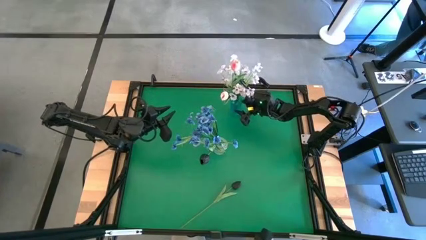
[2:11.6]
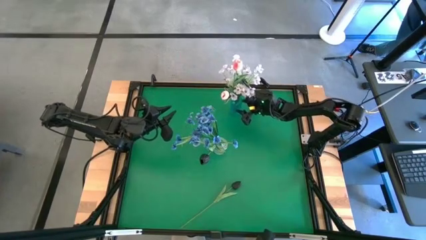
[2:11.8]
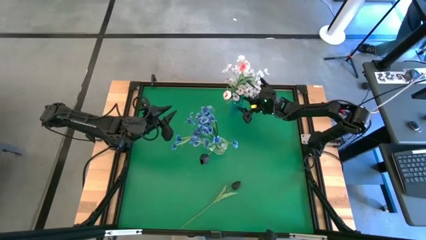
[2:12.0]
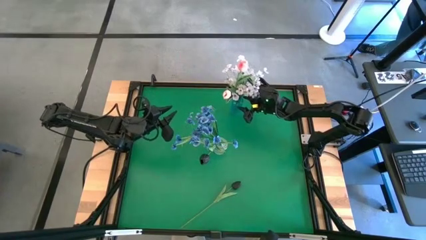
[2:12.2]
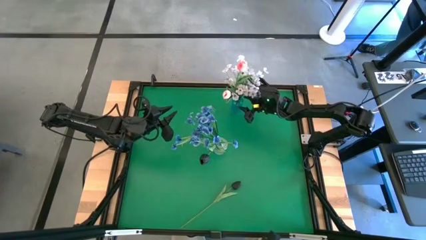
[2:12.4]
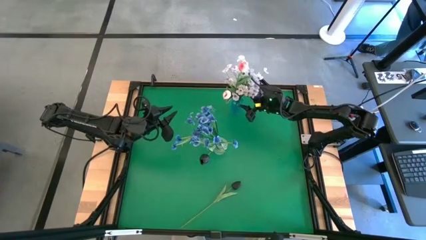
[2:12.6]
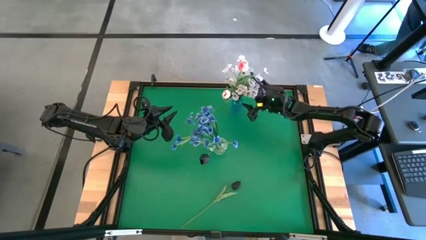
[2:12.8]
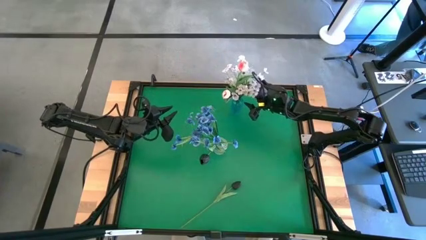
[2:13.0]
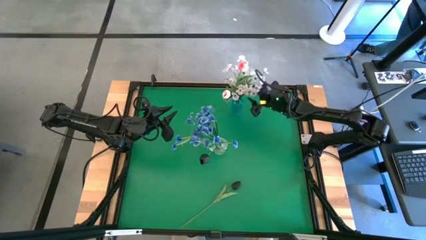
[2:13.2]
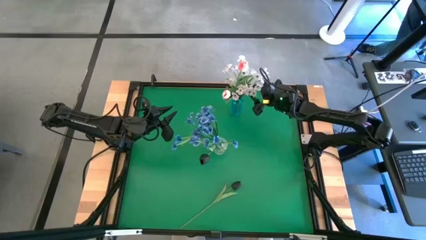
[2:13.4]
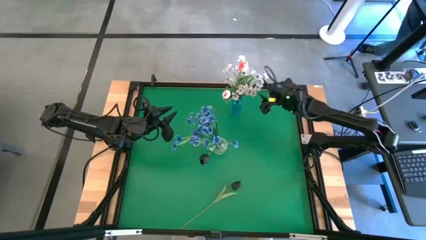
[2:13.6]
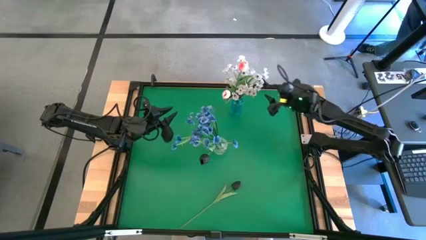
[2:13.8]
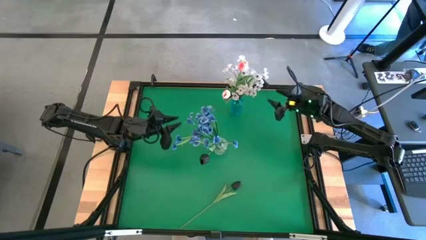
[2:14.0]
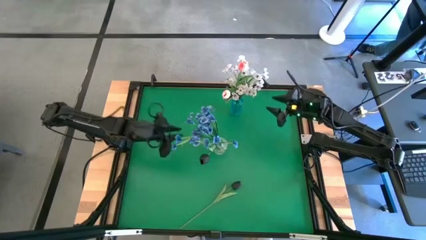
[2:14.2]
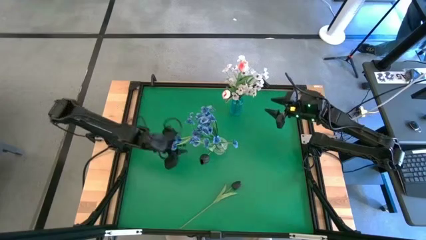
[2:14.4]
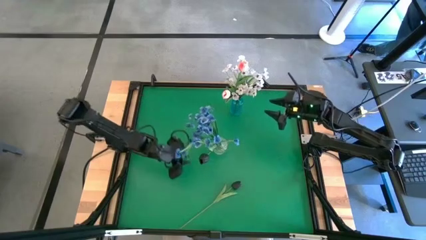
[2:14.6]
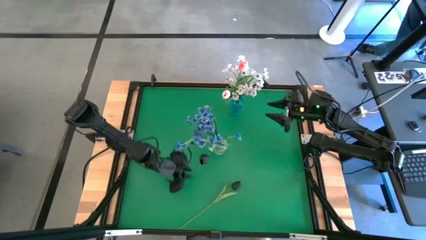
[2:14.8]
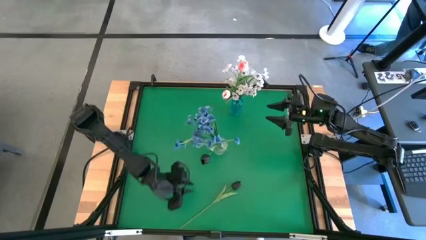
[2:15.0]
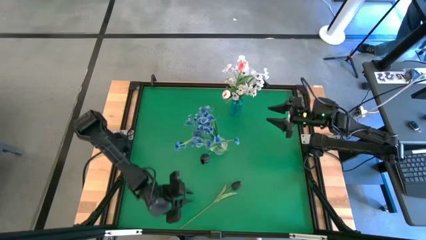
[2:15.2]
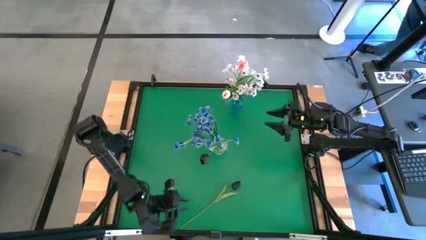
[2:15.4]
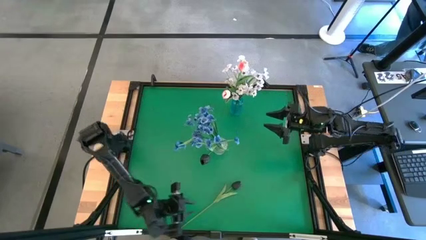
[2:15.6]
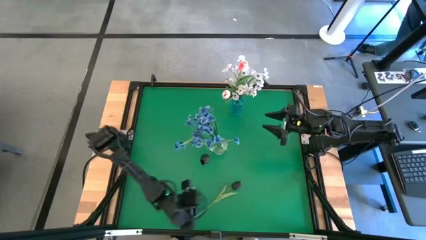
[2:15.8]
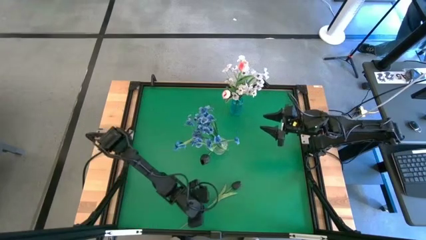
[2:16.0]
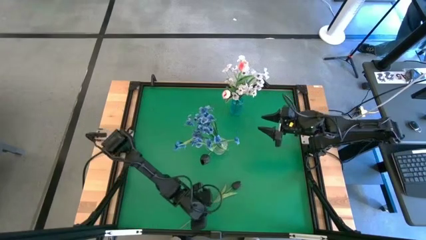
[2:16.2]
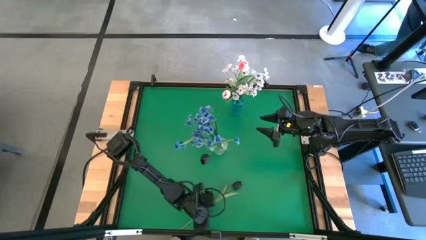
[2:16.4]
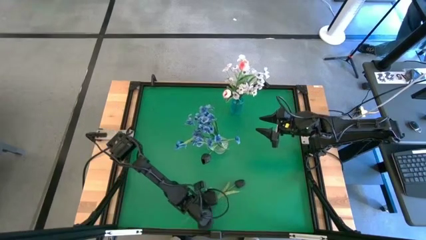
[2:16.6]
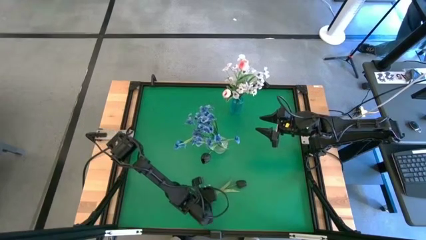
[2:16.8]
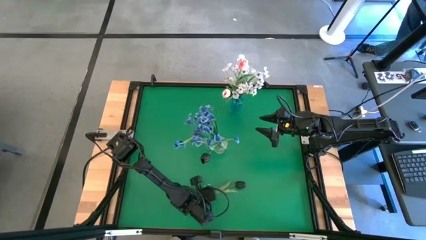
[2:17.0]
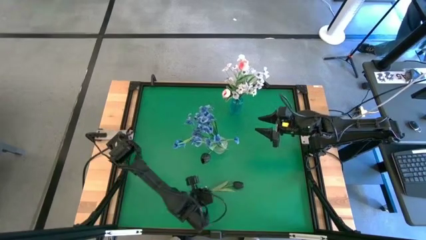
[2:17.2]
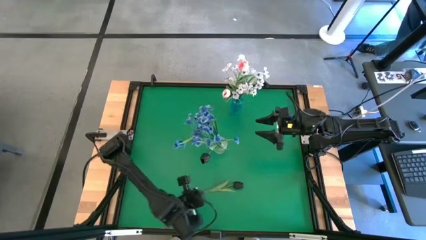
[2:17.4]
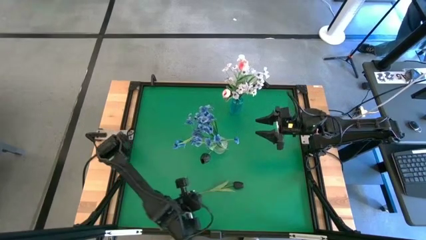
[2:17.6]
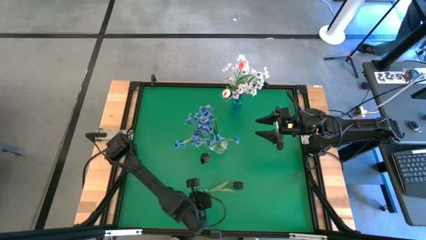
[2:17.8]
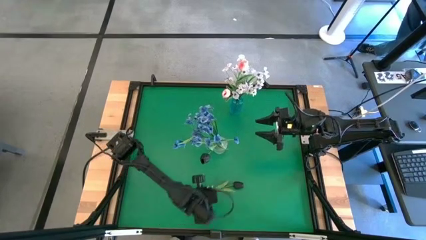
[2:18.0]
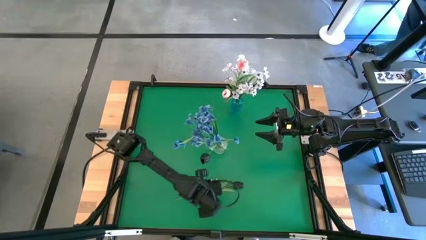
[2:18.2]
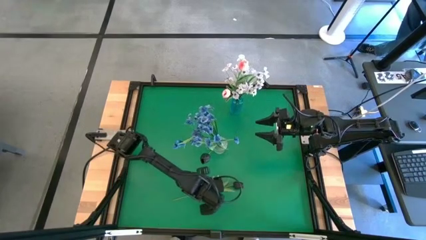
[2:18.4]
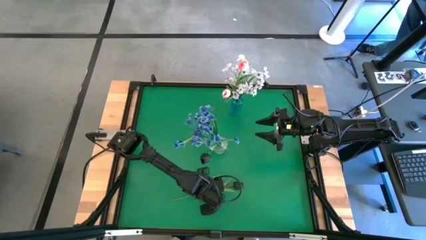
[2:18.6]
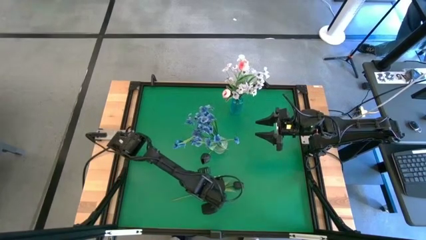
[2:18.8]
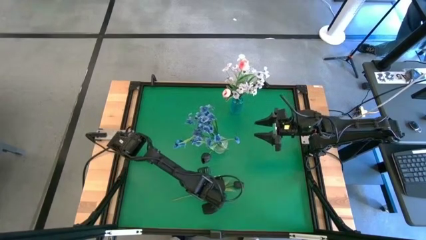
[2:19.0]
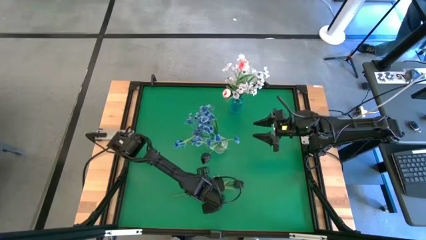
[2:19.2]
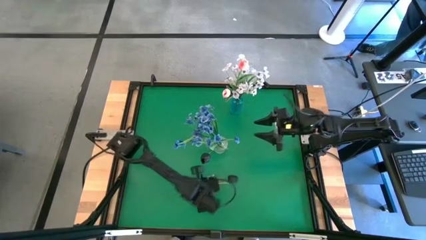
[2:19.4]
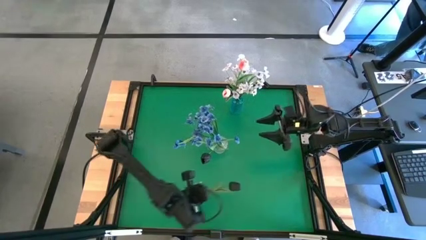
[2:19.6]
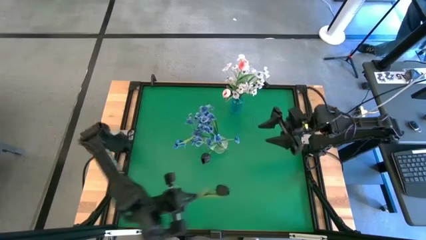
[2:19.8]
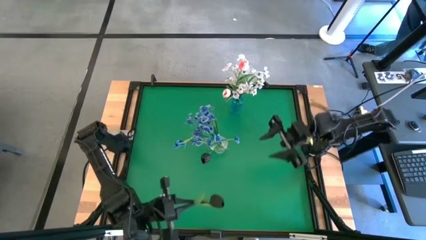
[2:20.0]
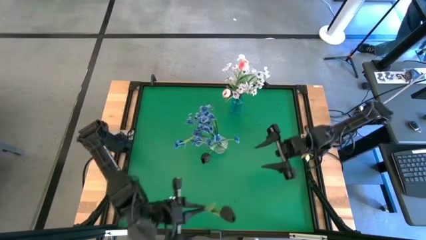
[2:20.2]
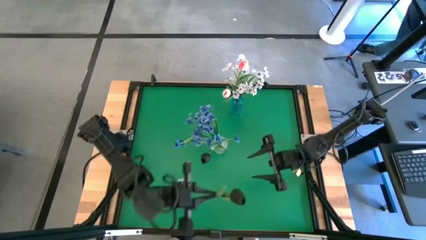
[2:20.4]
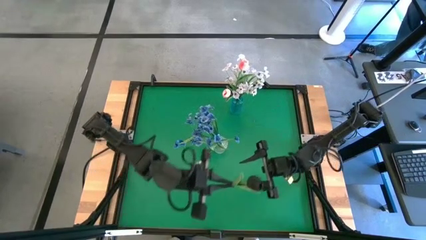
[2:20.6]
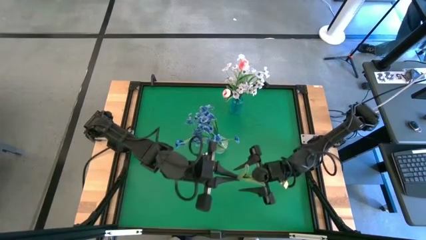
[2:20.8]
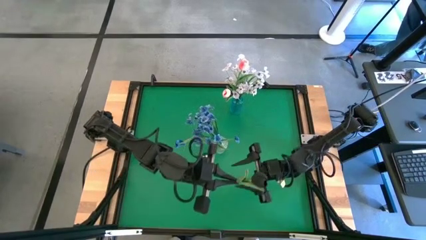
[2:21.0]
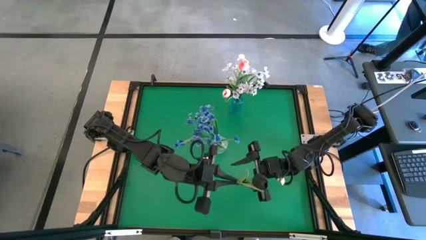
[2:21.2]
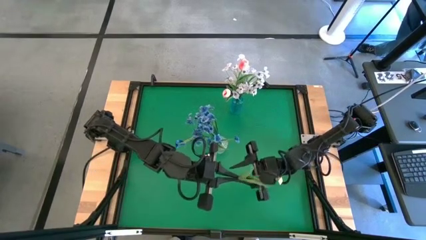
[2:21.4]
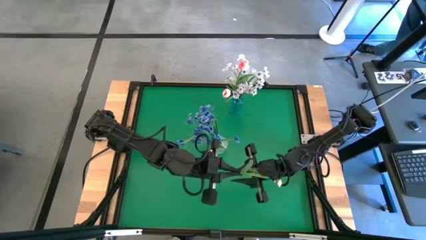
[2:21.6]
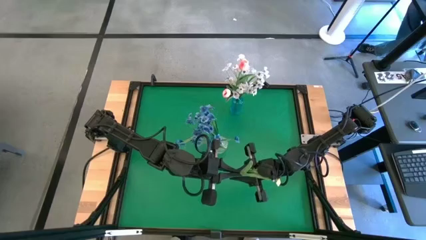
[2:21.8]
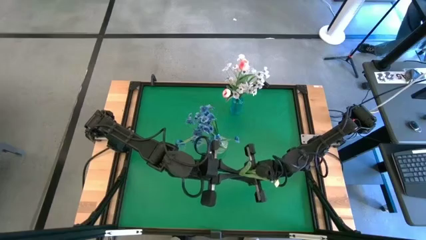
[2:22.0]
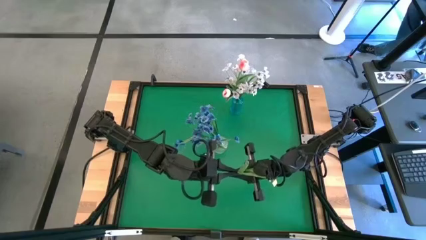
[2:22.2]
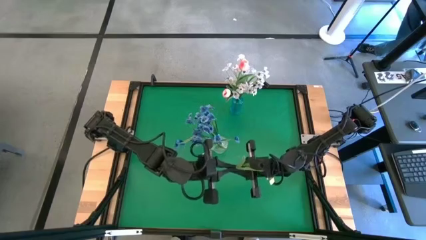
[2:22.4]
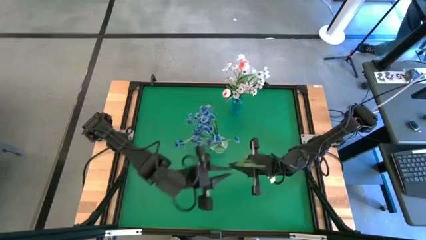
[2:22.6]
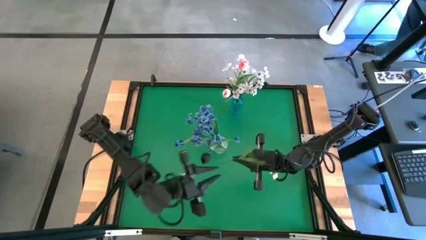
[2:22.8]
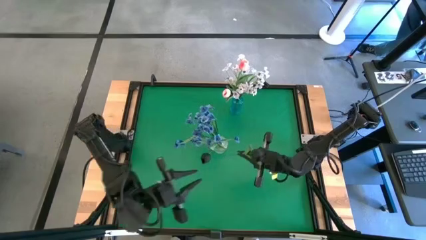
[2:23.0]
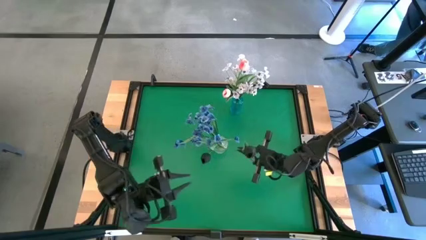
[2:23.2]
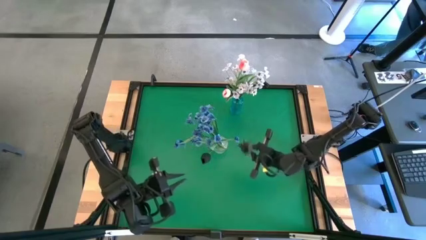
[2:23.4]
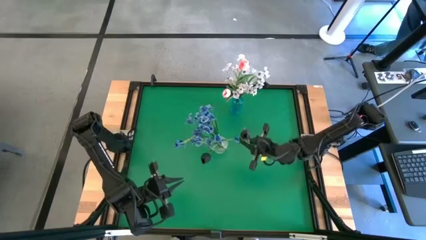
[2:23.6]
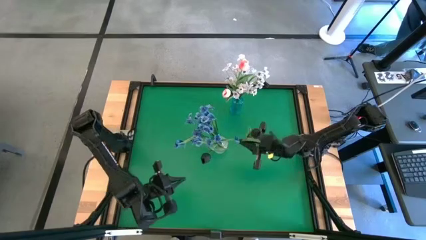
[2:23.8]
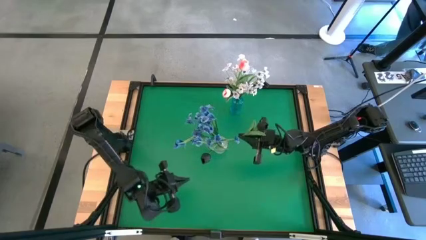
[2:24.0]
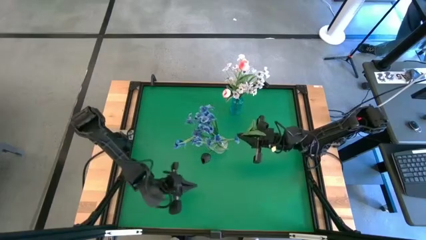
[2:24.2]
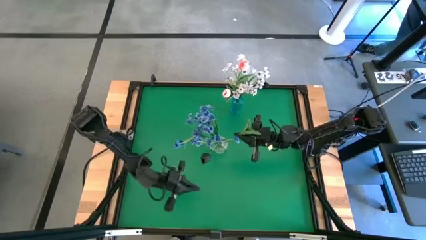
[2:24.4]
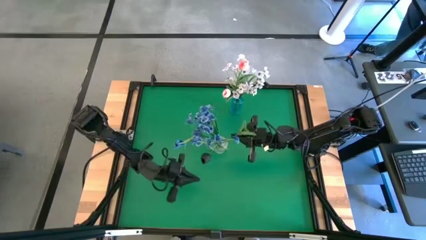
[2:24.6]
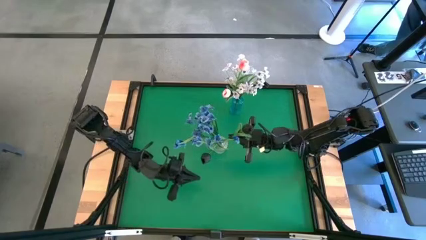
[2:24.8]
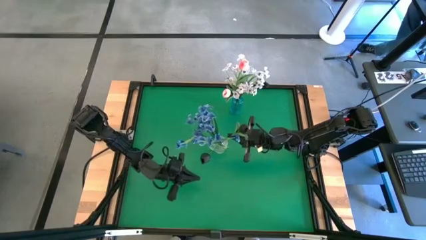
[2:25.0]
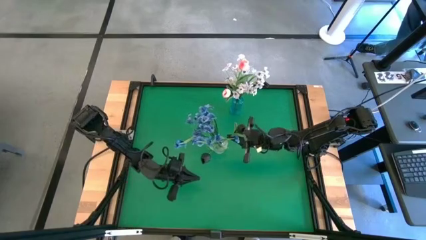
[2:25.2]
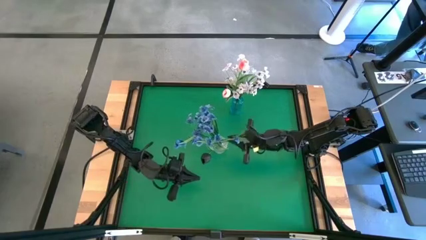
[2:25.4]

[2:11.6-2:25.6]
Task: Sort flowers into vase by color
Put the black flowers into the transparent vase
